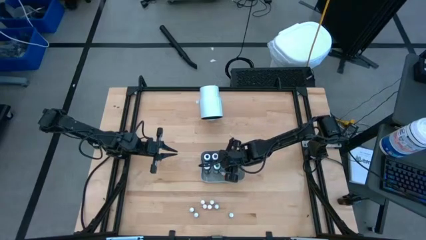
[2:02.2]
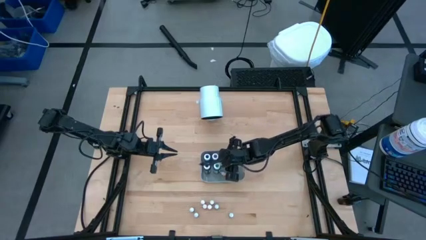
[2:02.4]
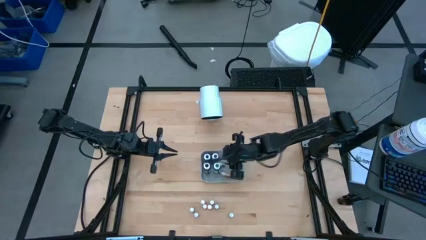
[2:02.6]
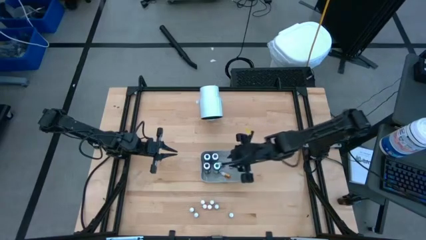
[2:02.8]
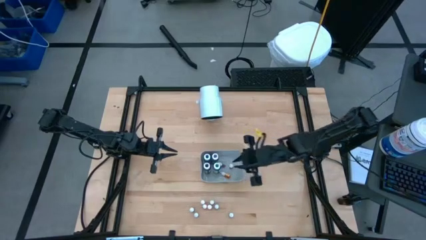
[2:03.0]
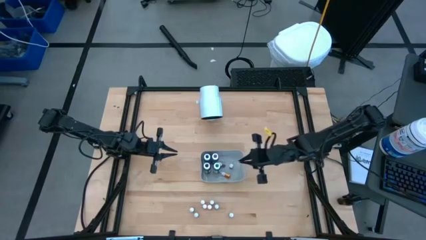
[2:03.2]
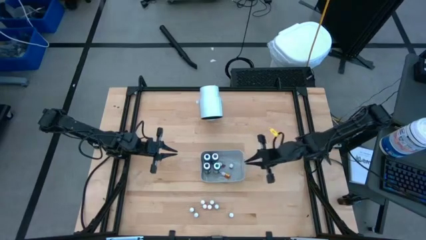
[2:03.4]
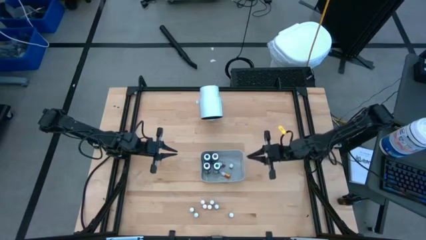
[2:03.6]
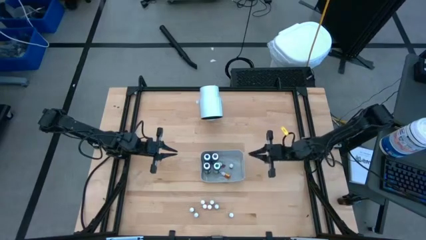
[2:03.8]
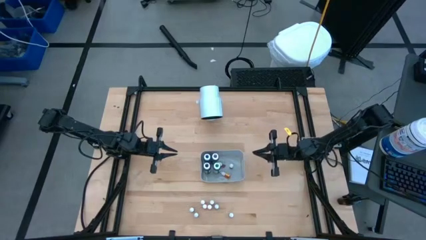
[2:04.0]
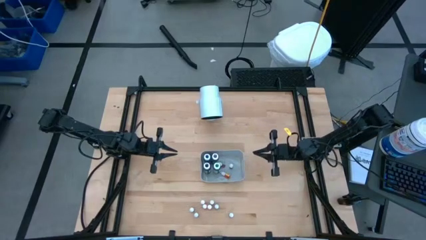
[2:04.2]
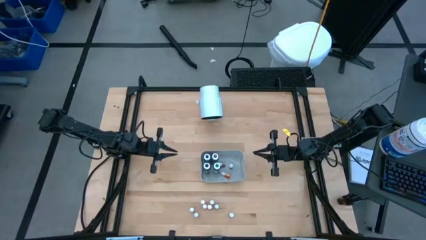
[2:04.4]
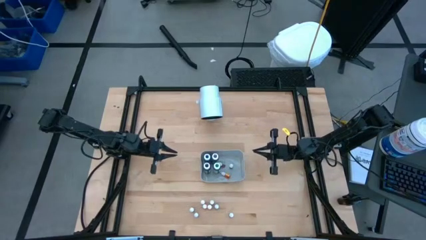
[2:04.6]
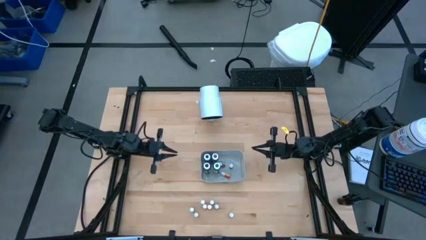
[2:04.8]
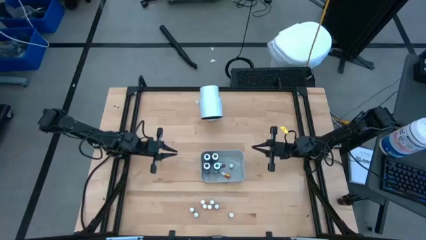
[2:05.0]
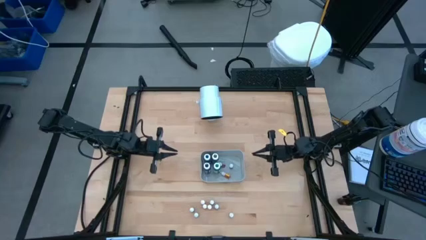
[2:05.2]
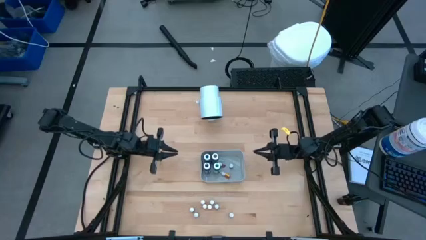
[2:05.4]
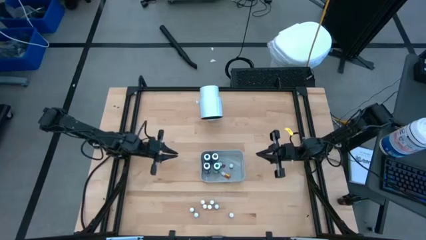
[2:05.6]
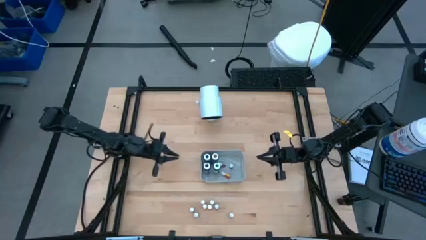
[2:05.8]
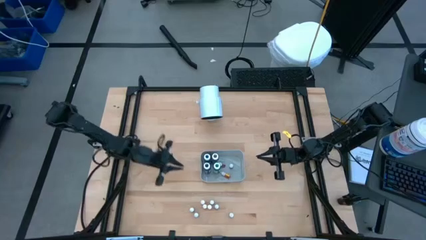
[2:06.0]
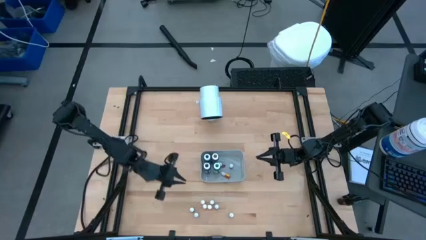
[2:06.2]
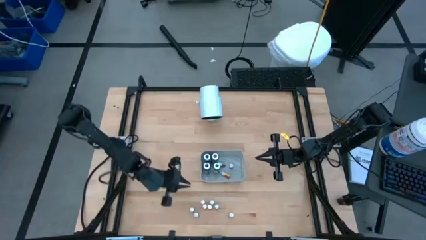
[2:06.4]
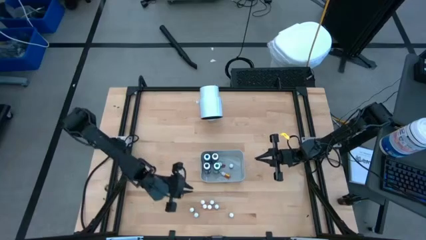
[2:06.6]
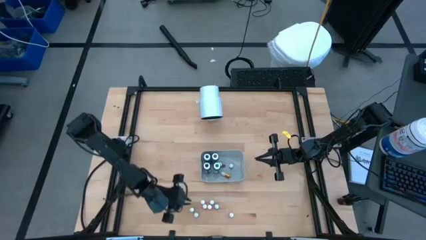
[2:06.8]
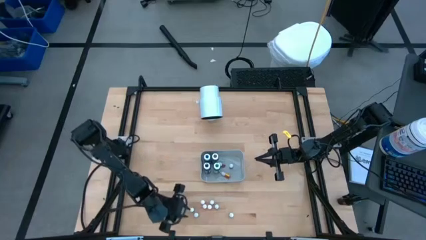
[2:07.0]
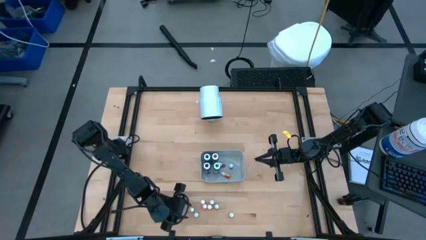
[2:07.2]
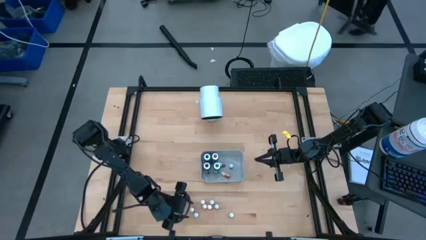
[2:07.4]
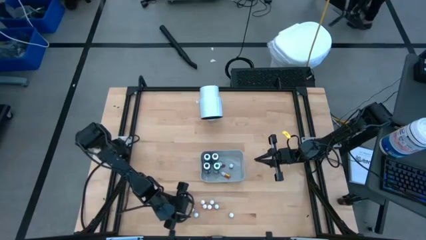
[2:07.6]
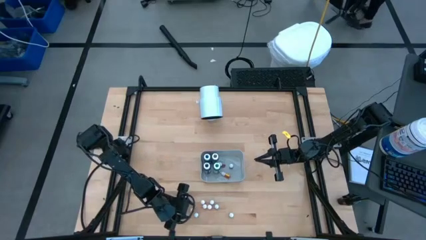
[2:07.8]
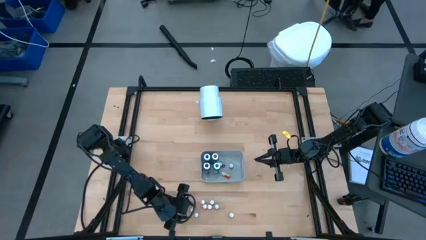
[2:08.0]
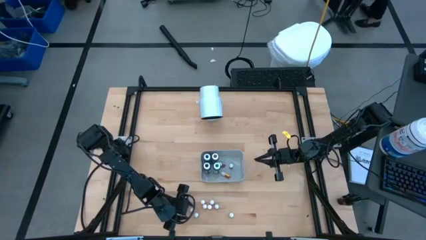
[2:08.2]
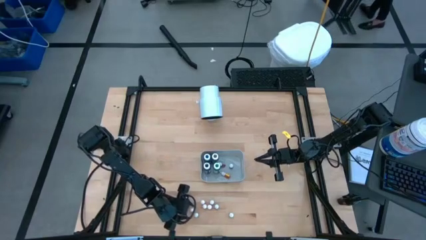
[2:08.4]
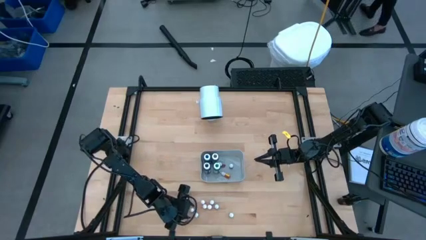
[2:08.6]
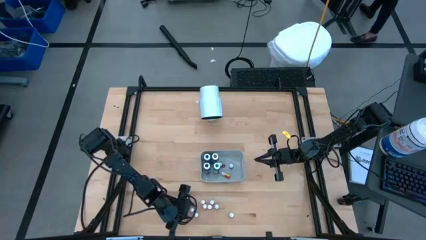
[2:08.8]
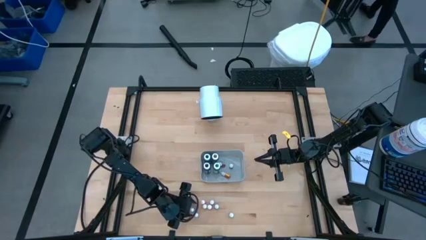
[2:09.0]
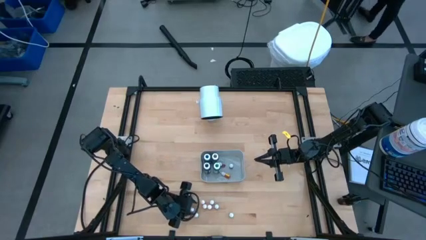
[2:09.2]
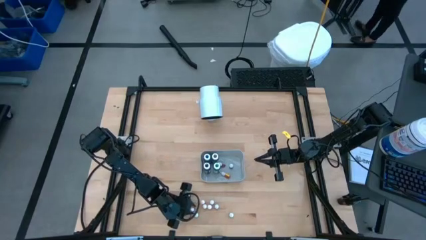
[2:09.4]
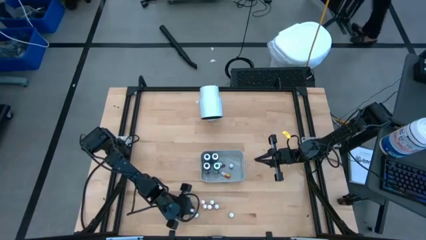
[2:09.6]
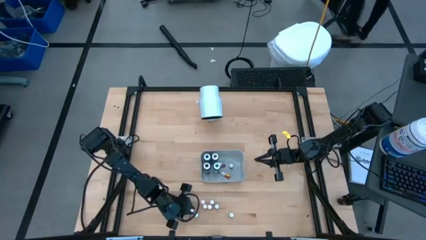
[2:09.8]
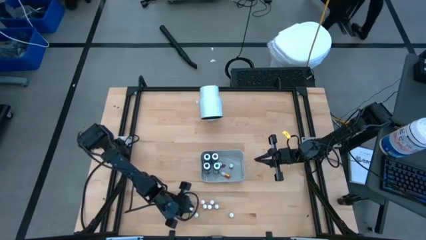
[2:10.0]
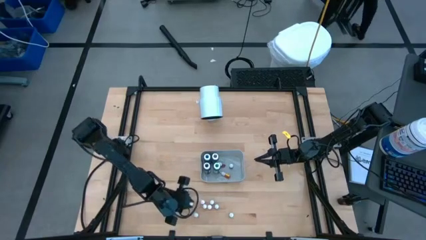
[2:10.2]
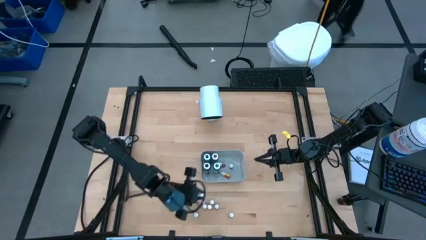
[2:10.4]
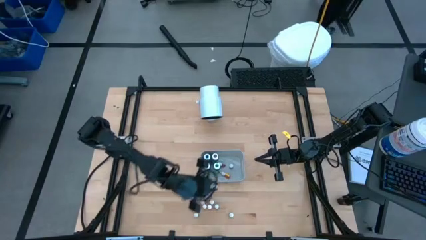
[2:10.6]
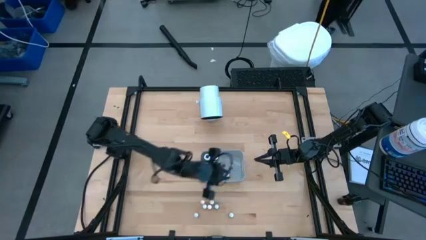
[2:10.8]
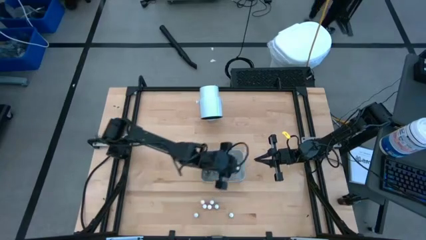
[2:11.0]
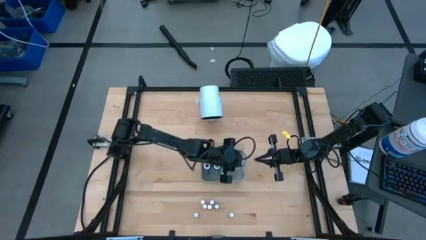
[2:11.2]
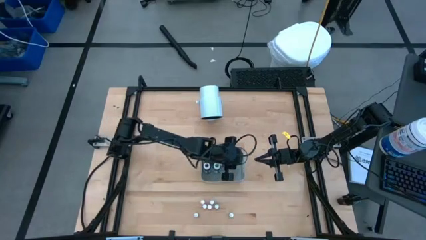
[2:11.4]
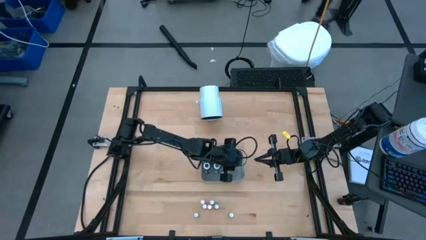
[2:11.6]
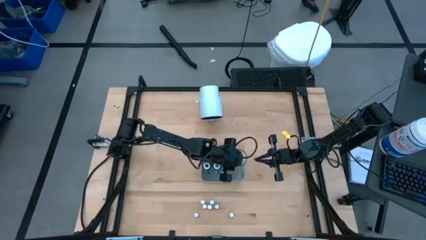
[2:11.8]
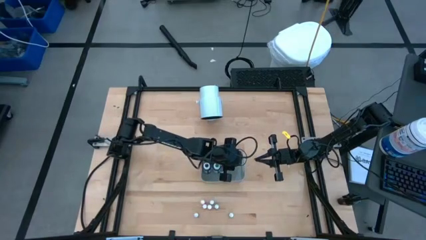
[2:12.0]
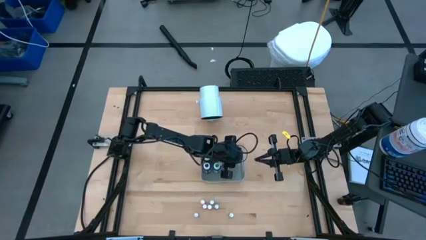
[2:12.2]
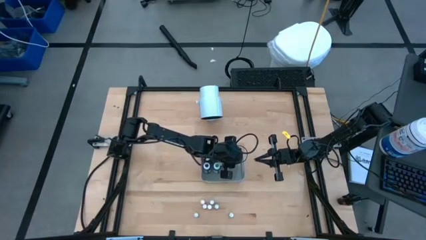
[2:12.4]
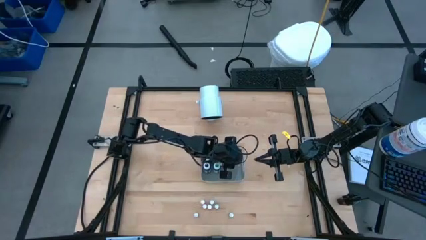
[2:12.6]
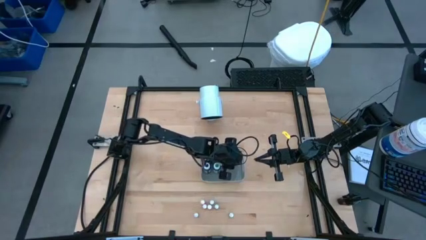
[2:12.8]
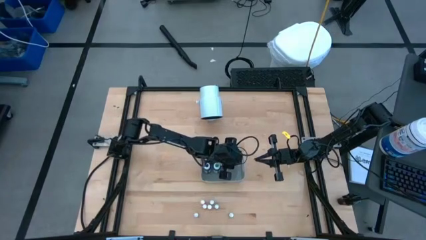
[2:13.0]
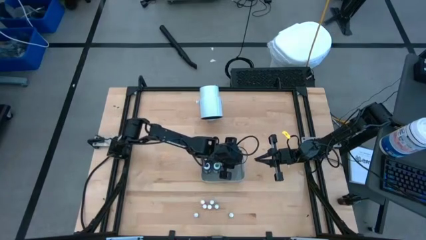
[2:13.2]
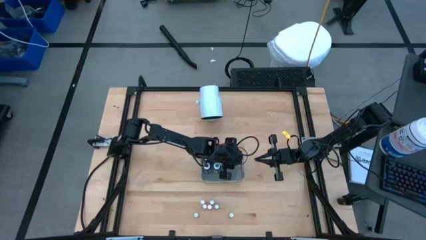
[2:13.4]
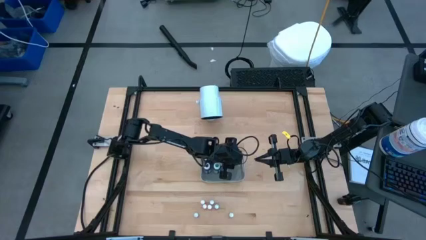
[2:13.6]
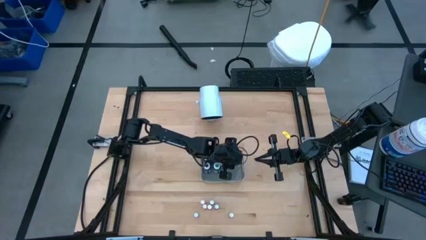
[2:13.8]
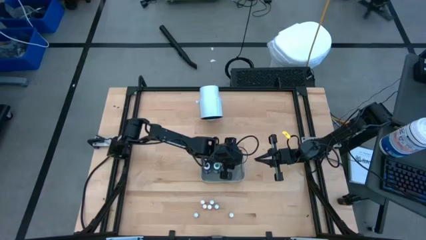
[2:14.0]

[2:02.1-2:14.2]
Task: Pick & Place food coloring
Put the small purple food coloring bottle into the gray bin
